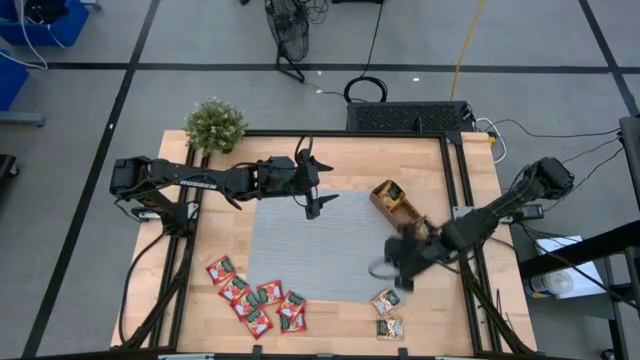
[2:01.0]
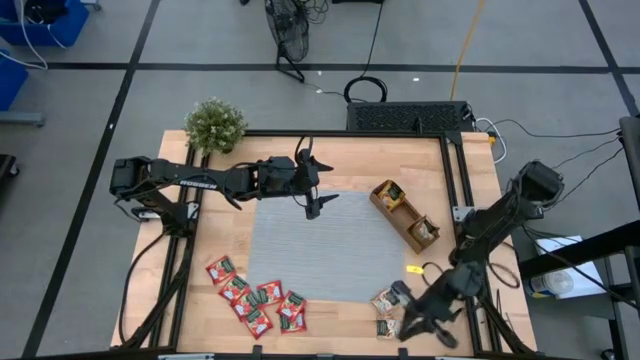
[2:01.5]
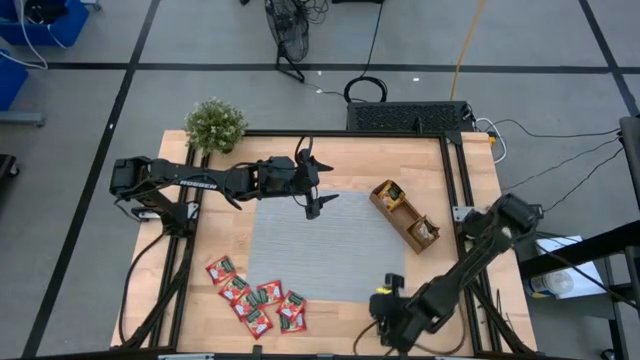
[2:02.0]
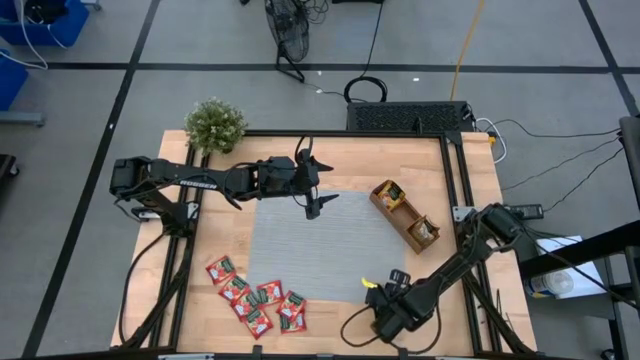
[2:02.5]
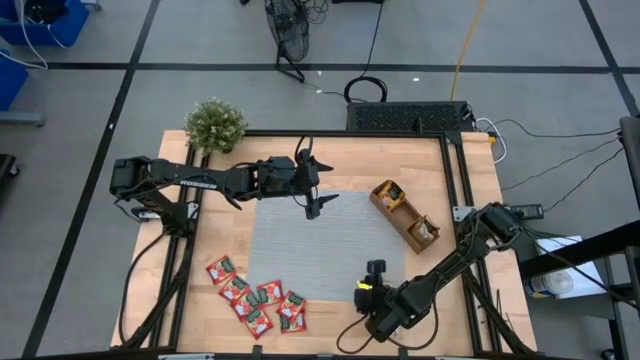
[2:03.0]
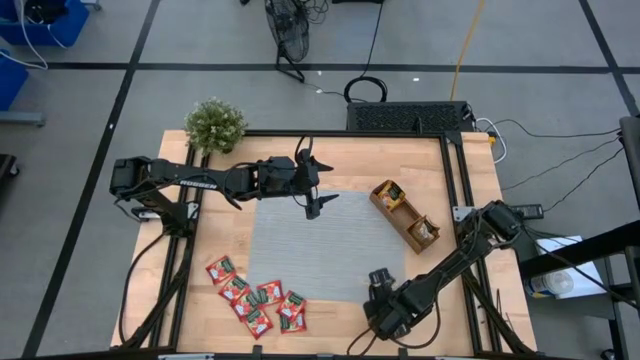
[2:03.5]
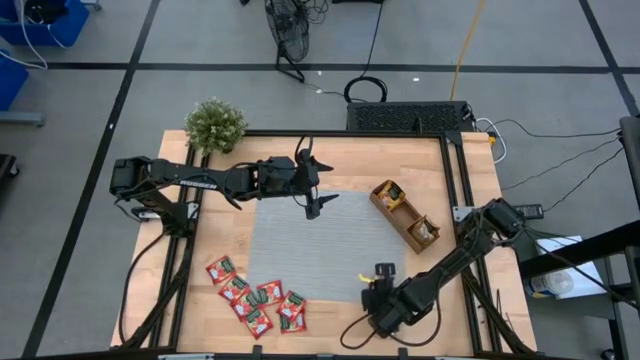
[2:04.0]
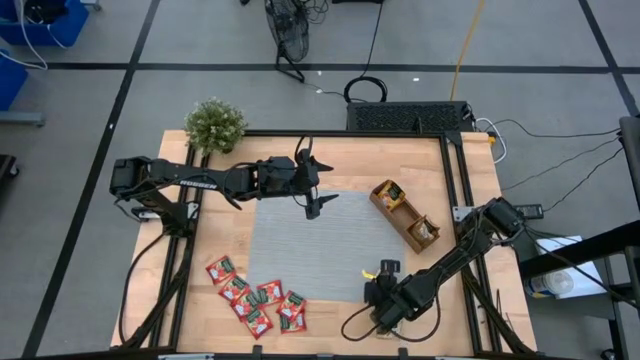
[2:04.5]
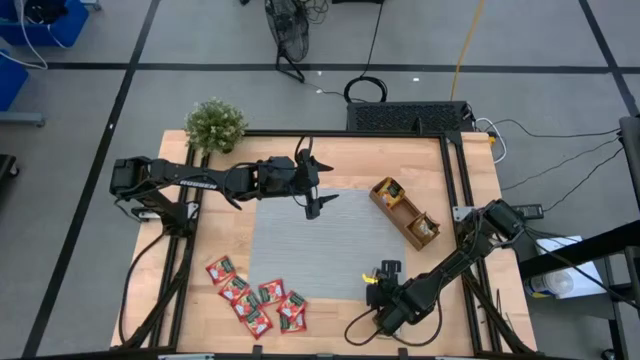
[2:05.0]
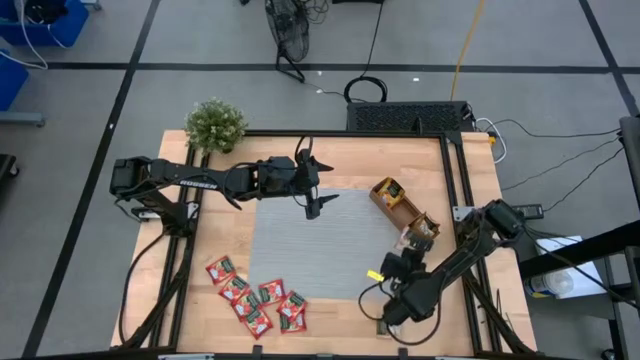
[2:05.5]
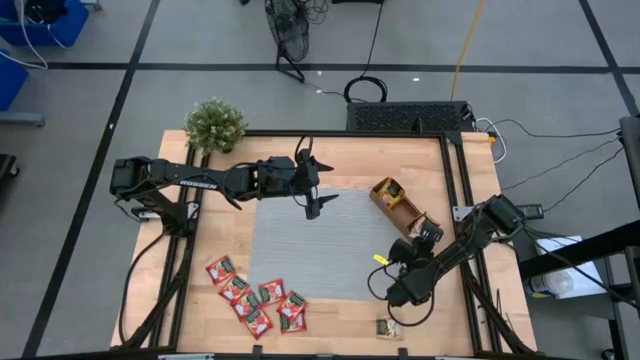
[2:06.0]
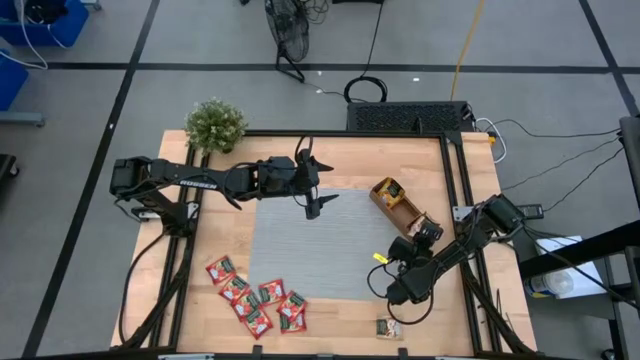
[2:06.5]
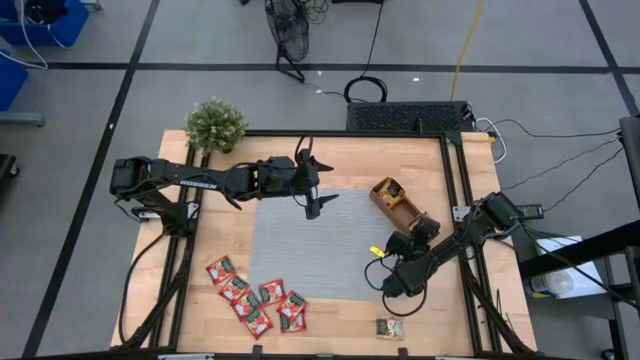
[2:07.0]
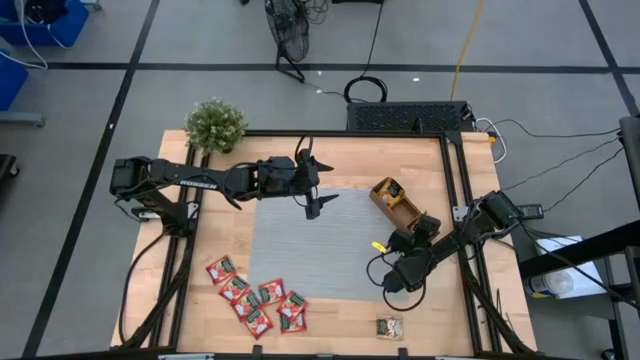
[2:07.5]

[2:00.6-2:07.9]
Task: Pick & Place Tea
Put the brown tea bag into the right section of the wooden organizer

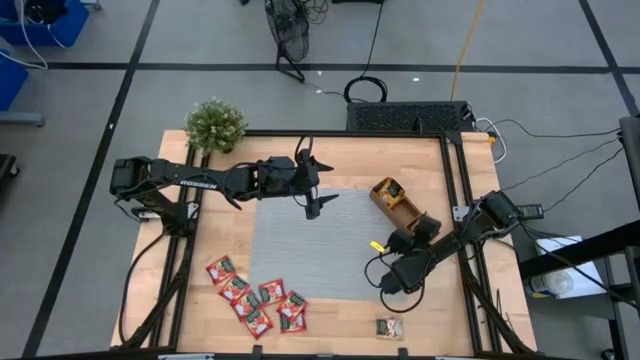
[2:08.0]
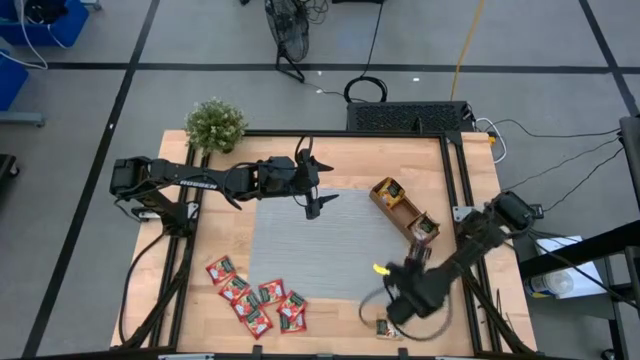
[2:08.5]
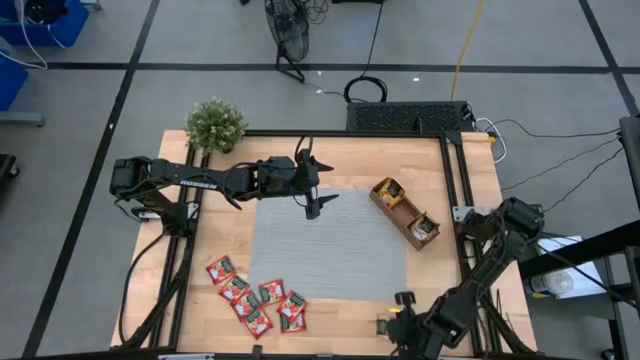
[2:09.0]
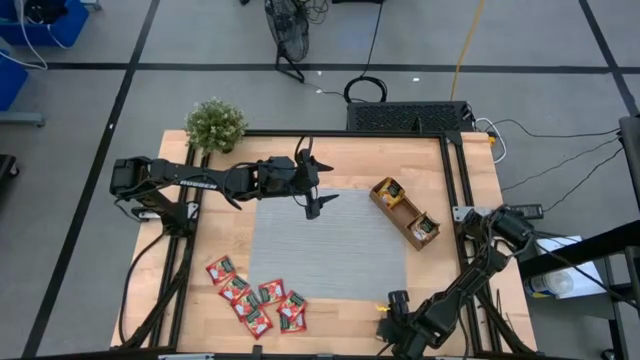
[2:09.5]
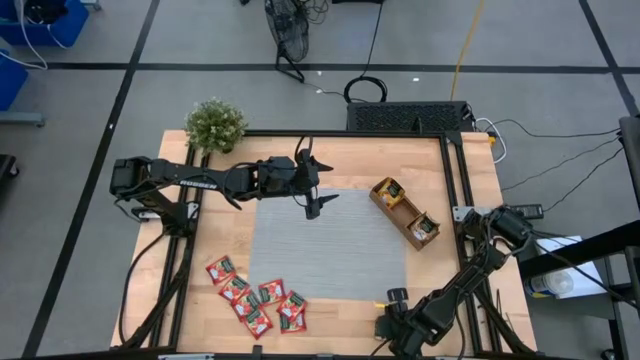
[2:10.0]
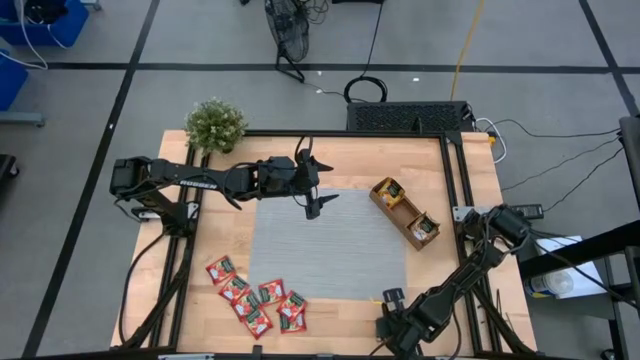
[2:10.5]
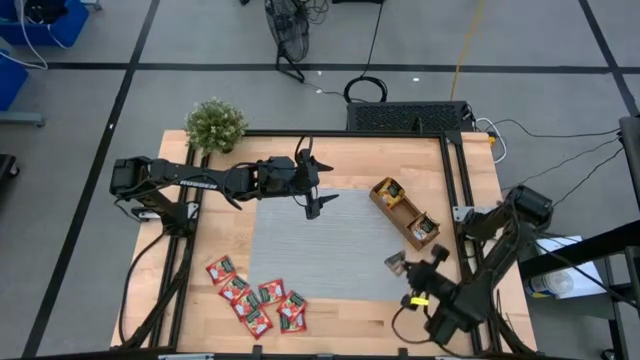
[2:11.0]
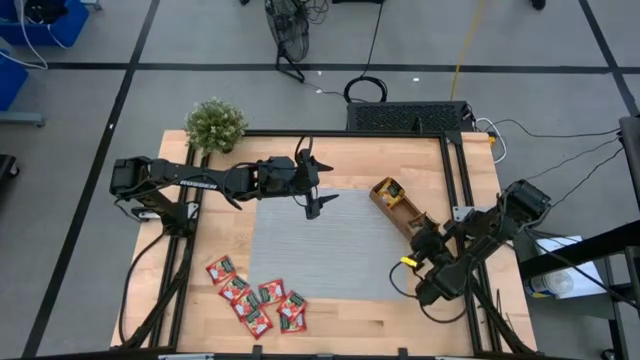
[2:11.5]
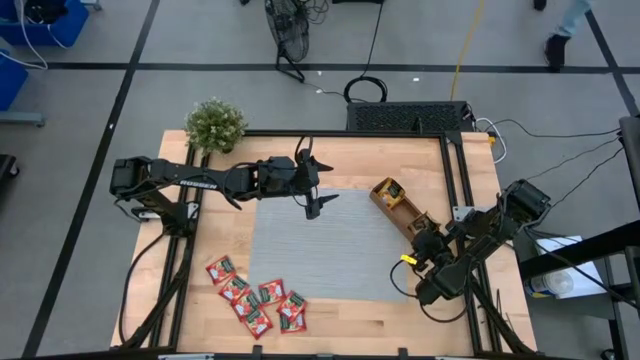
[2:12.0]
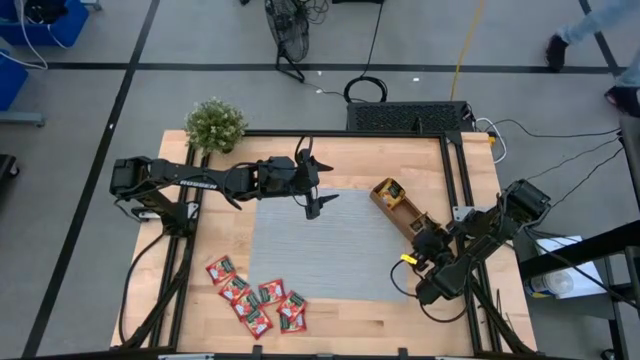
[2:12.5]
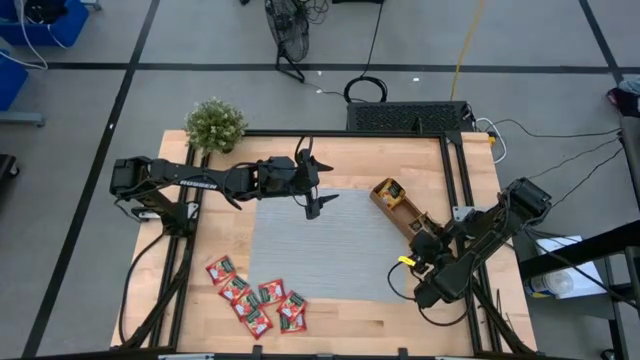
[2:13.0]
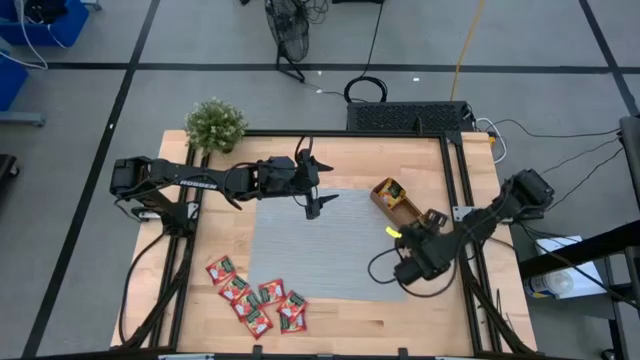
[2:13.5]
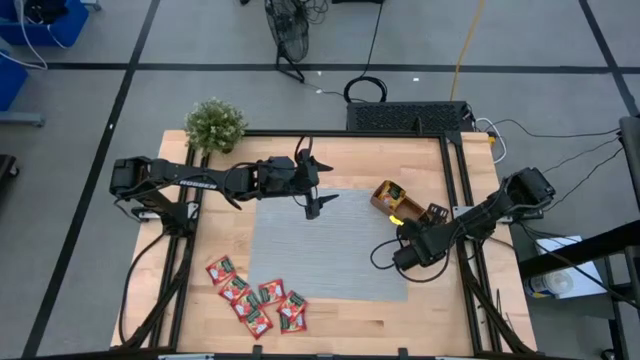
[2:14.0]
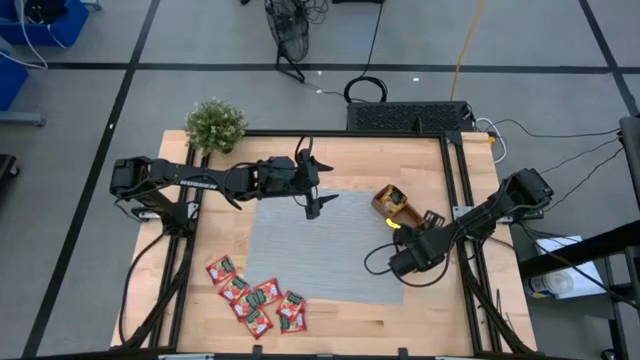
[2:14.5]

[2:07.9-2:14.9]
Put the brown tea bag into the right section of the wooden organizer

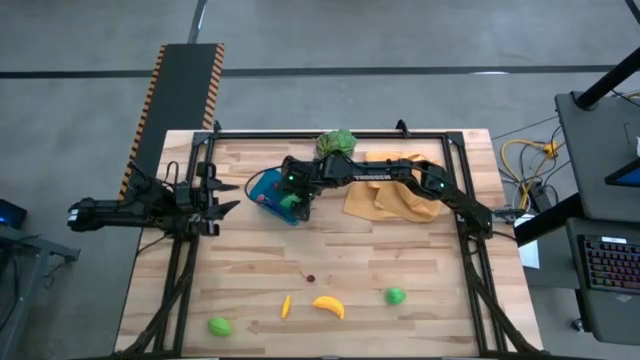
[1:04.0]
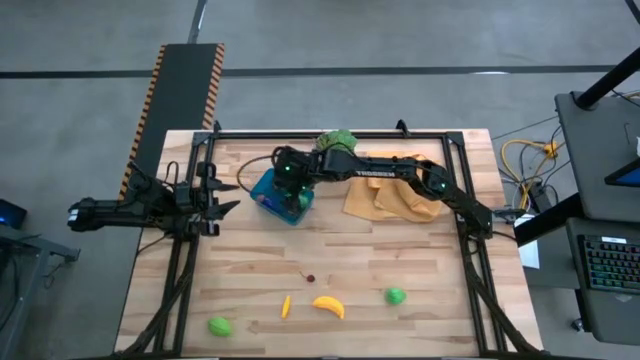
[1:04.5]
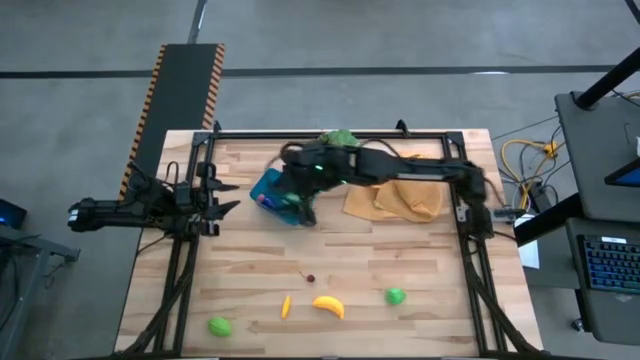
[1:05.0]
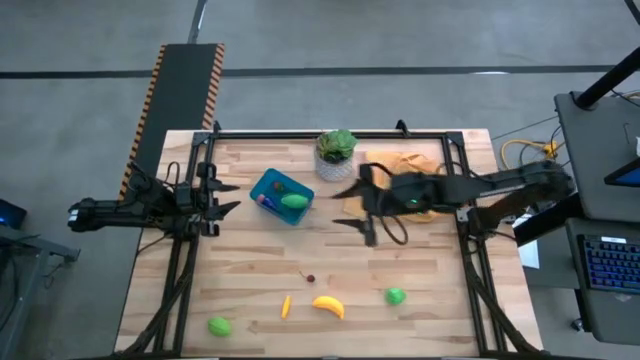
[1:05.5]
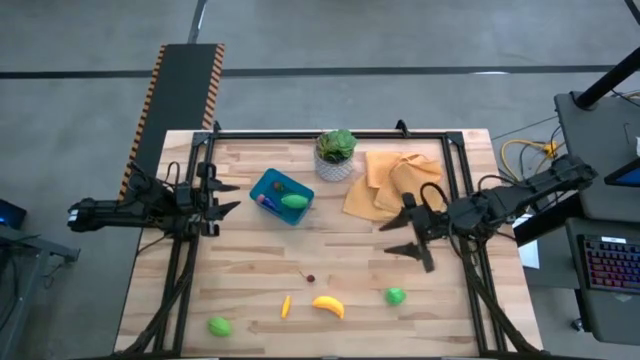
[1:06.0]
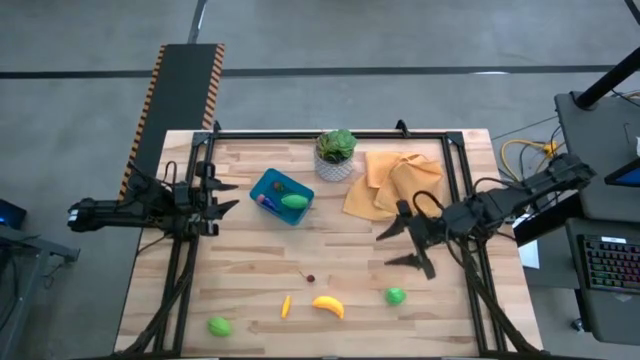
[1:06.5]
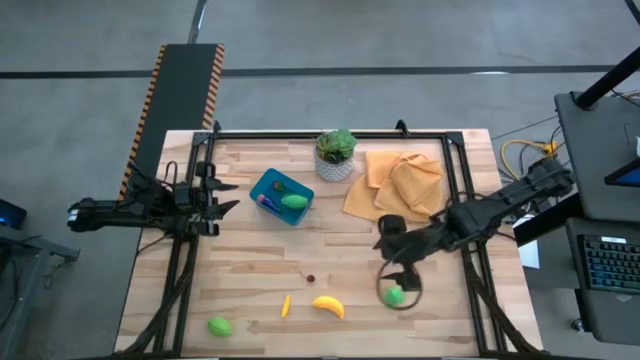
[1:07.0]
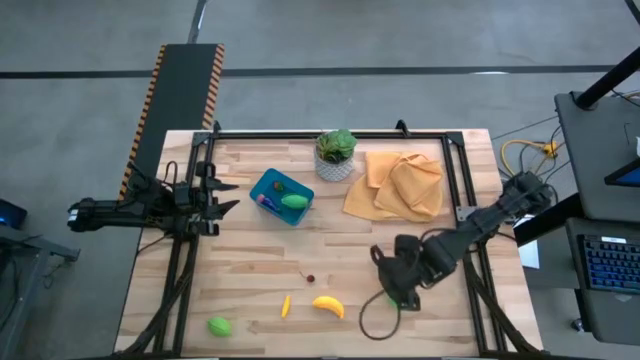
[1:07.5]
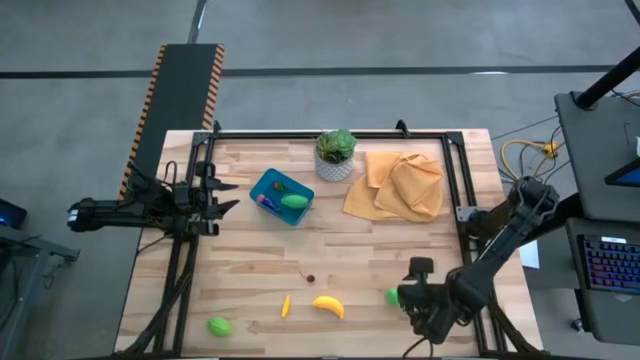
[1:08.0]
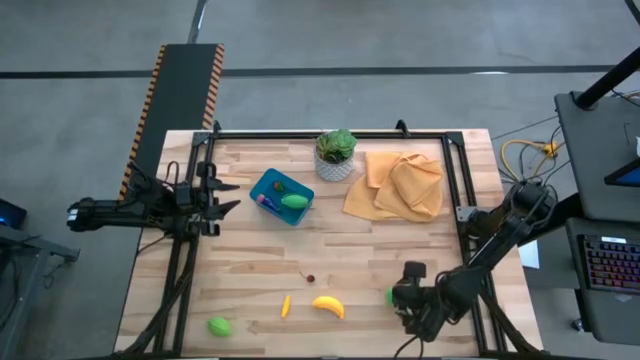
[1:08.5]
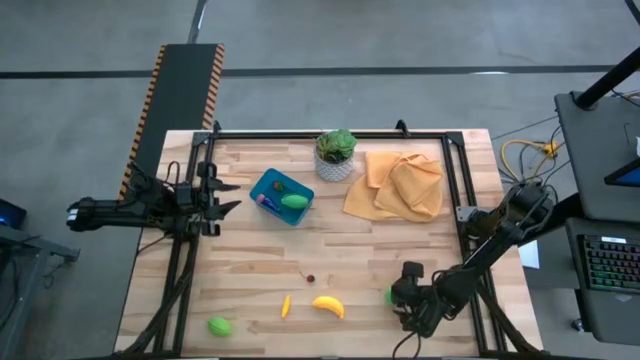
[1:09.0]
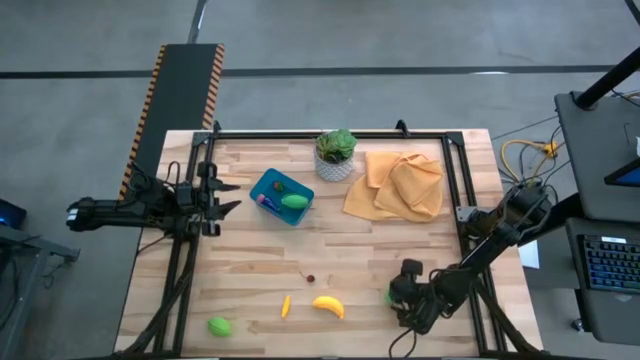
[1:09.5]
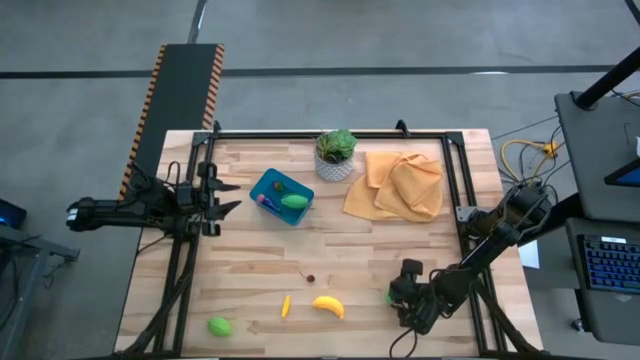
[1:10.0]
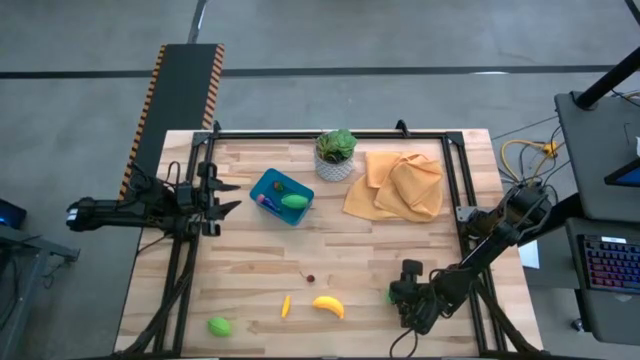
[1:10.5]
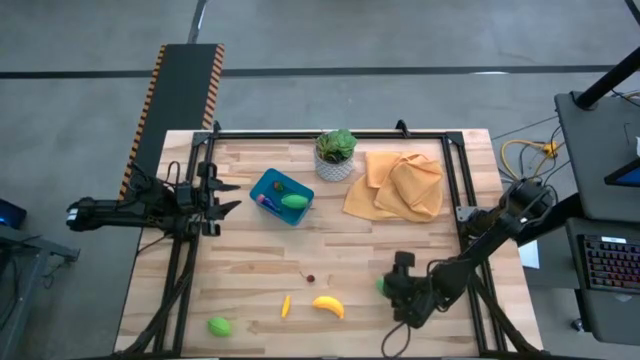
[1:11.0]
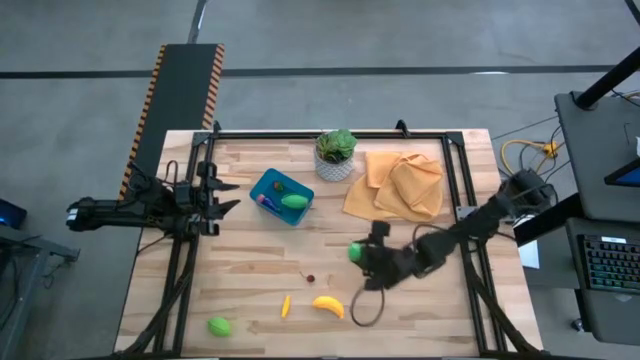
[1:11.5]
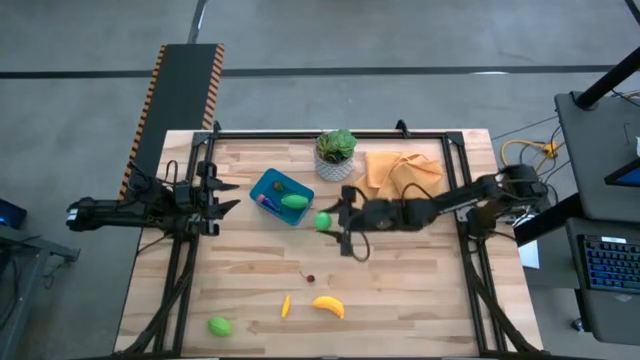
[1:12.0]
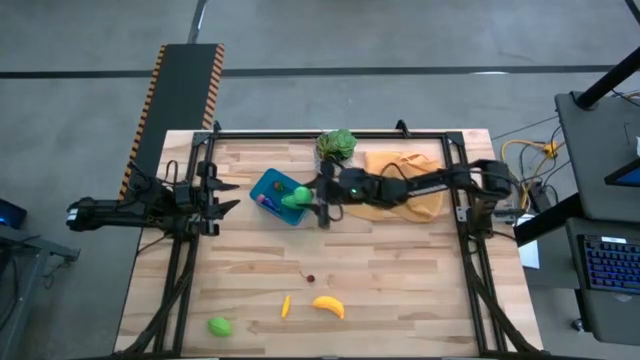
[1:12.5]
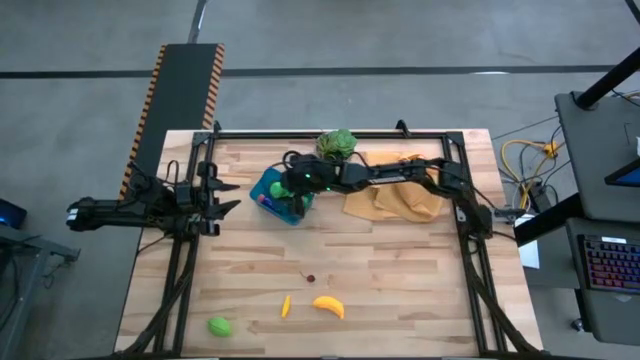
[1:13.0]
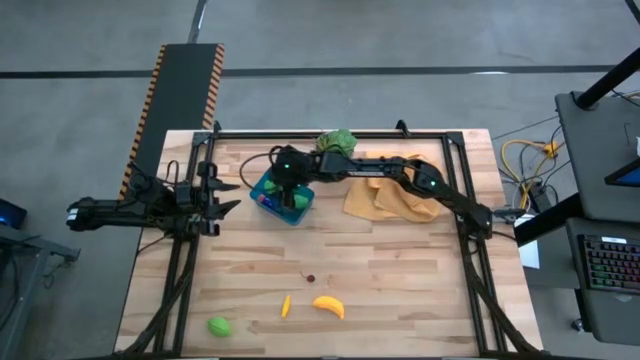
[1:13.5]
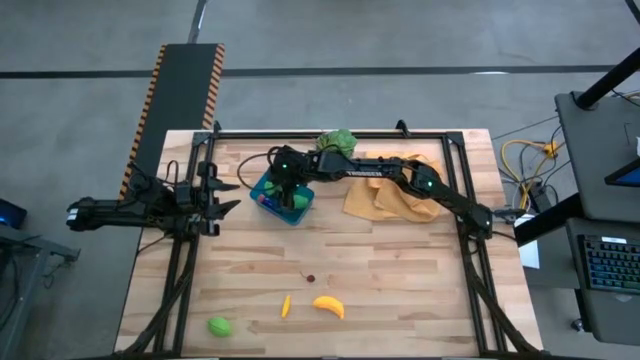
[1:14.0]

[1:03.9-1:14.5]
Task: Pick and placing Produce into tupperware
Put the green pear into the blue bin
